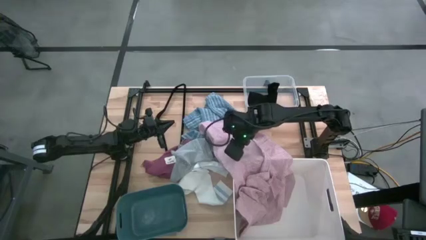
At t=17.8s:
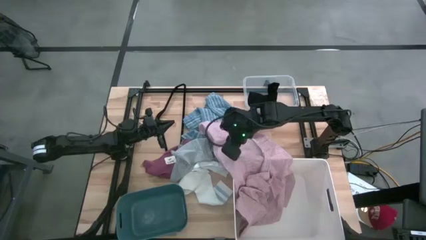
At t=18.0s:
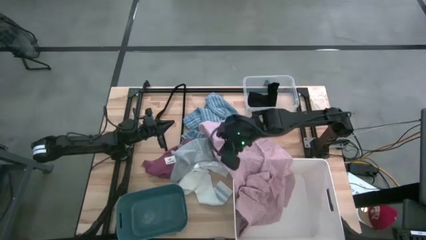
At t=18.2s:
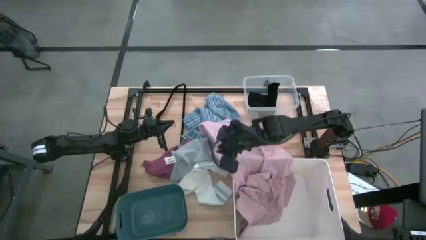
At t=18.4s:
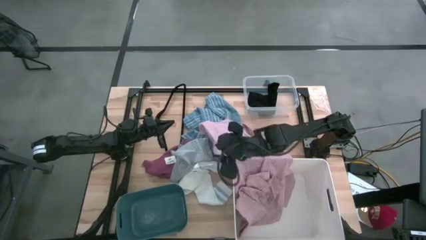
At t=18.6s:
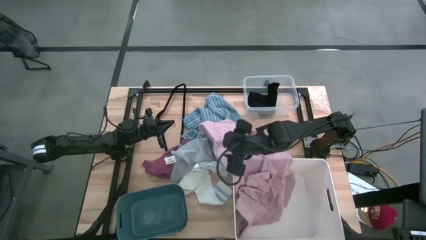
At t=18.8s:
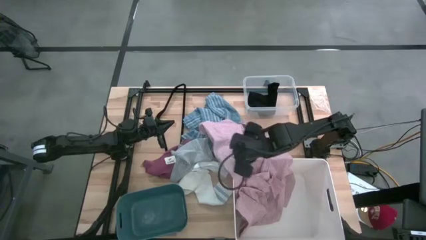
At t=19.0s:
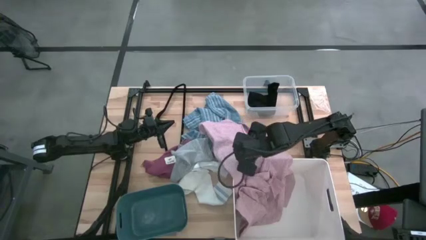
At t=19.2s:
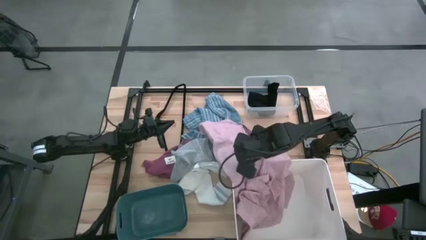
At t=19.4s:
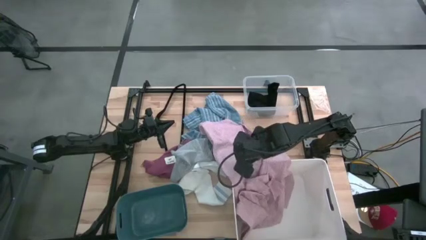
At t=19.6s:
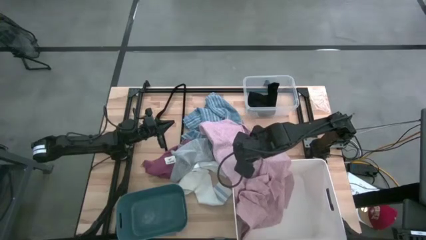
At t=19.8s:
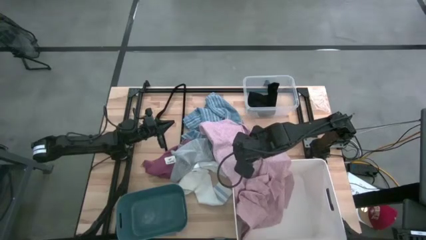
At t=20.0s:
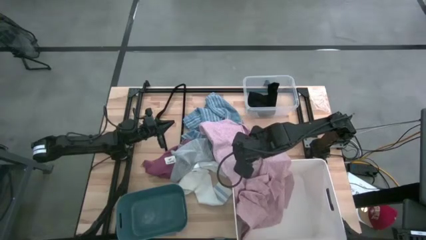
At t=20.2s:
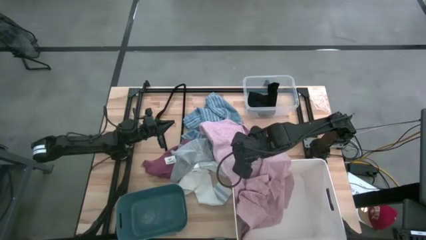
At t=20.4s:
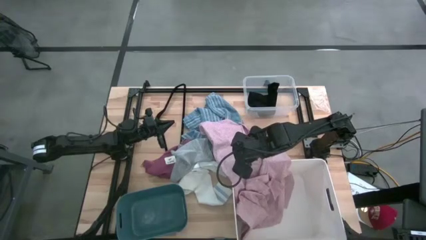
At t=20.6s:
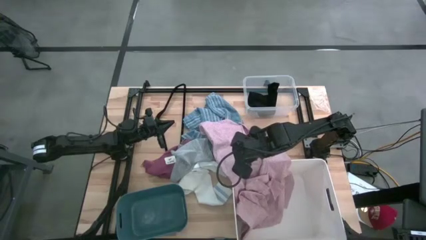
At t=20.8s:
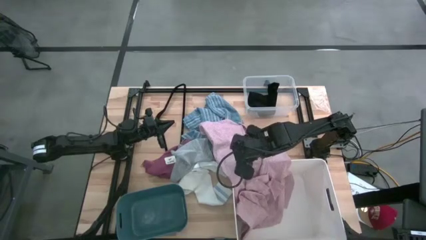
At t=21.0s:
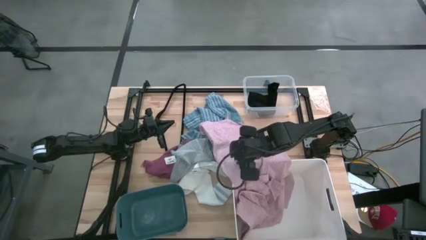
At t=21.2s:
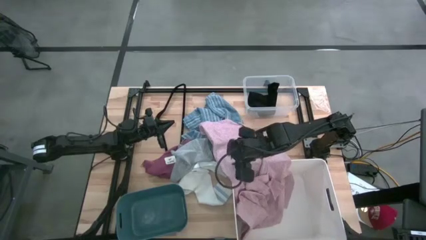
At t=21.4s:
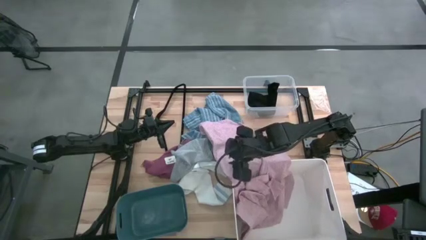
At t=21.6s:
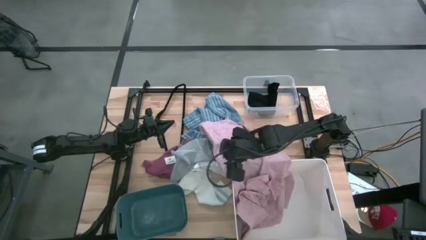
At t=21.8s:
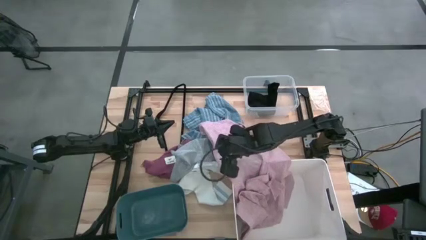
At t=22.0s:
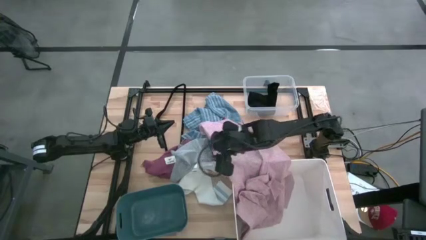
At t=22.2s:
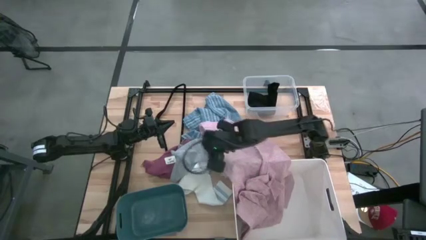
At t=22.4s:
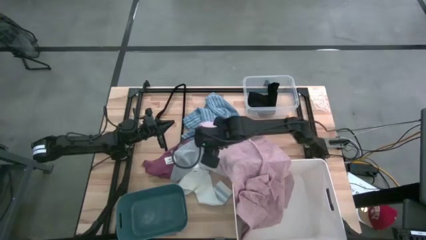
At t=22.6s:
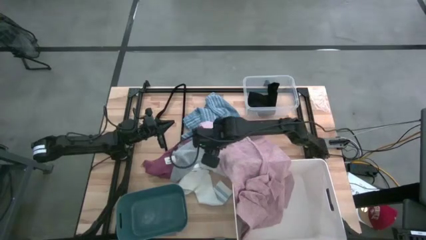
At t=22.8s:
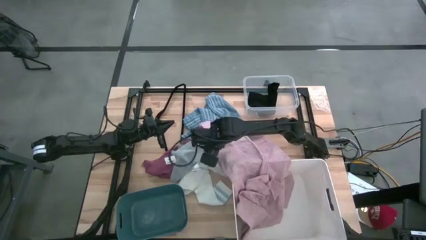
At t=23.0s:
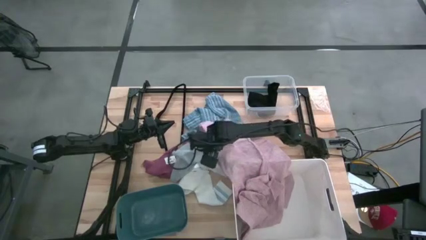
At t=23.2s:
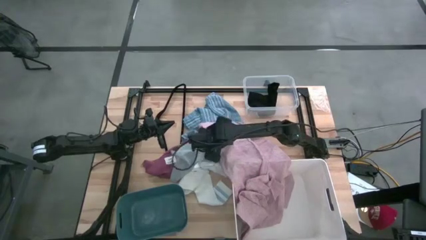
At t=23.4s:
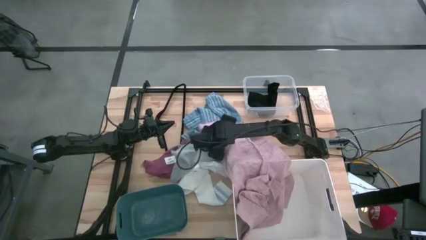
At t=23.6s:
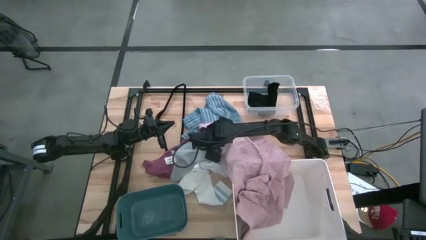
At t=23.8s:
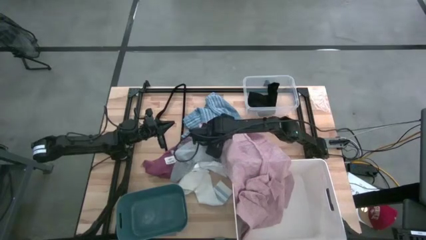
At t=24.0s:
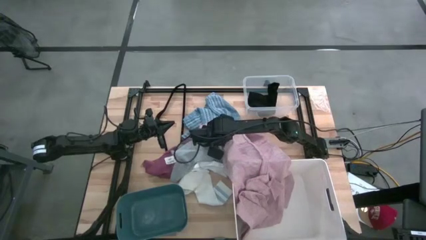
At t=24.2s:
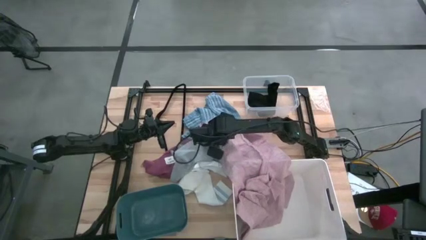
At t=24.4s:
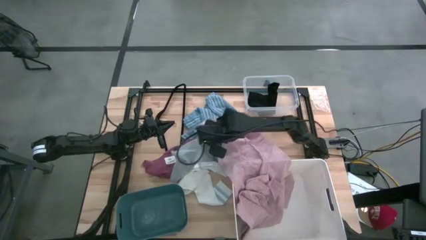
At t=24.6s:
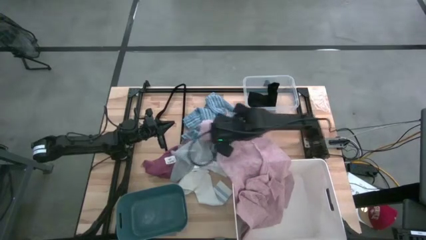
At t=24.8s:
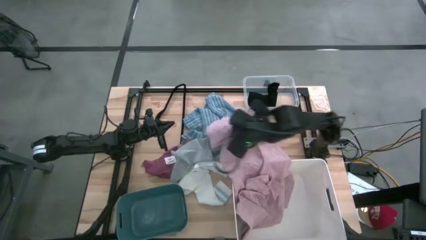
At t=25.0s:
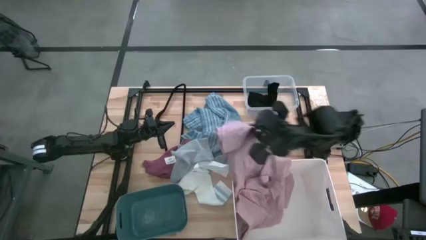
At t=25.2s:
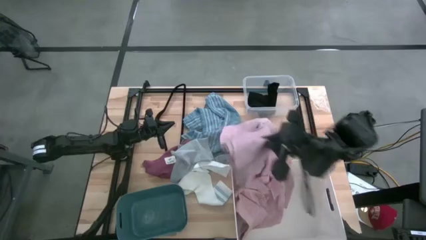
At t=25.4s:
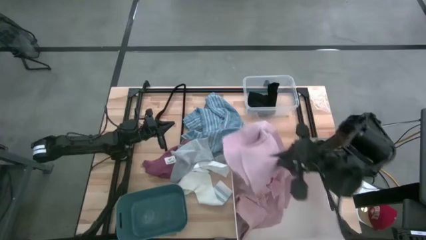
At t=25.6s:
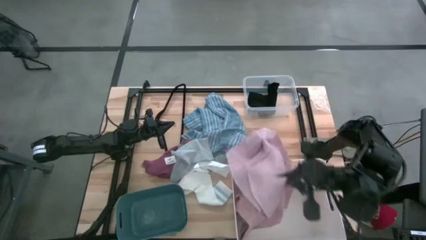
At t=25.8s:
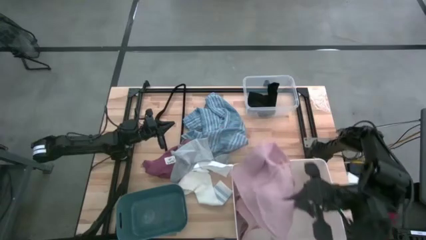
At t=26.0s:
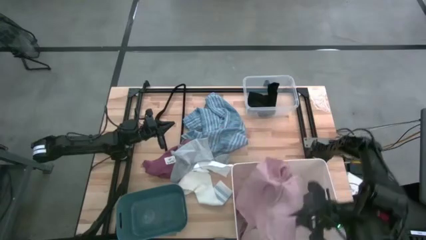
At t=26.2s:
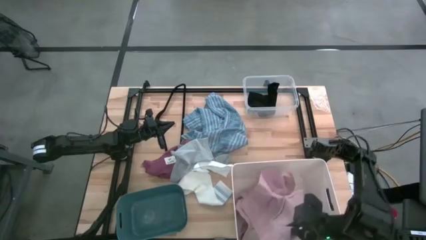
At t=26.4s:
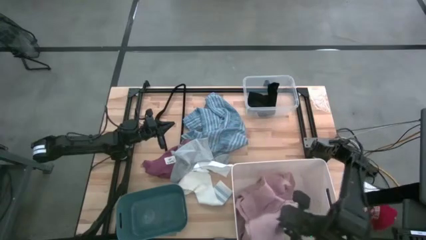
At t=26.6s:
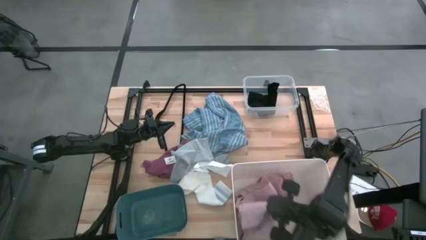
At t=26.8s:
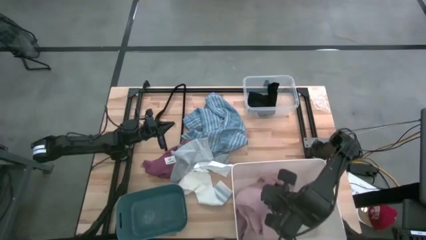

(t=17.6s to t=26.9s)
Task: Pick & Place Cloths
Put the light pink shirt into the white bin

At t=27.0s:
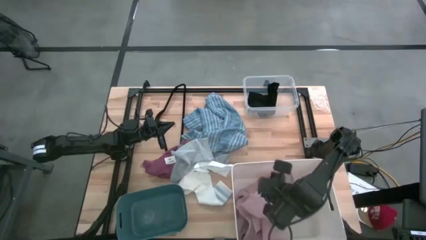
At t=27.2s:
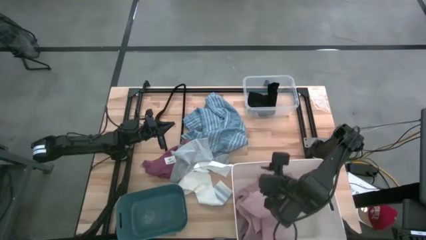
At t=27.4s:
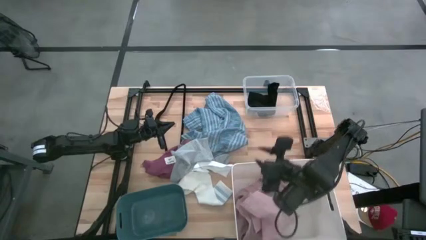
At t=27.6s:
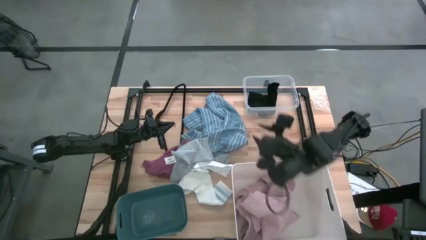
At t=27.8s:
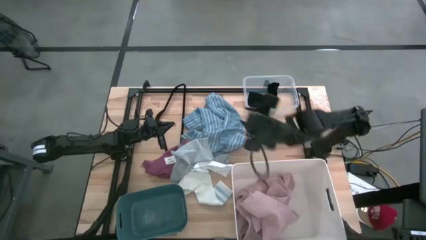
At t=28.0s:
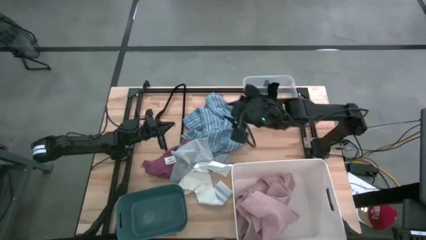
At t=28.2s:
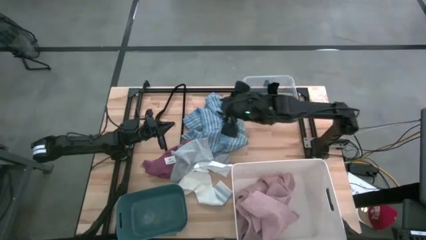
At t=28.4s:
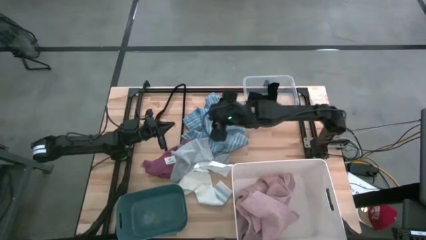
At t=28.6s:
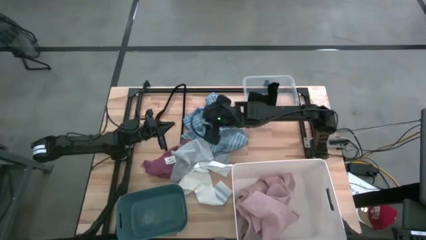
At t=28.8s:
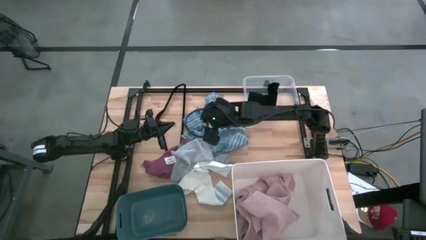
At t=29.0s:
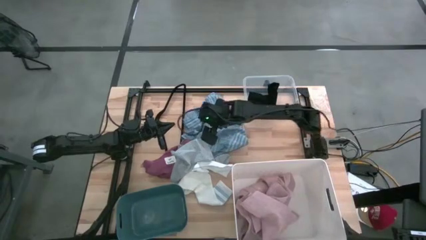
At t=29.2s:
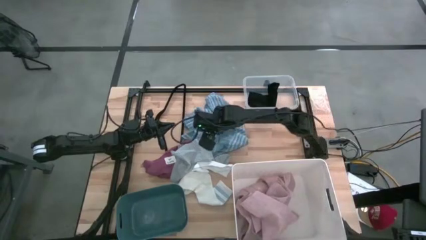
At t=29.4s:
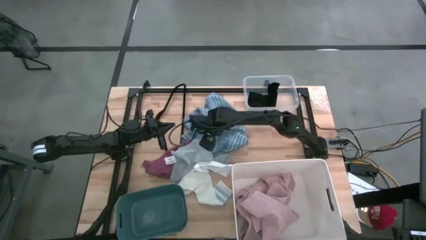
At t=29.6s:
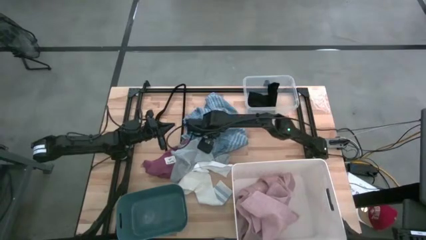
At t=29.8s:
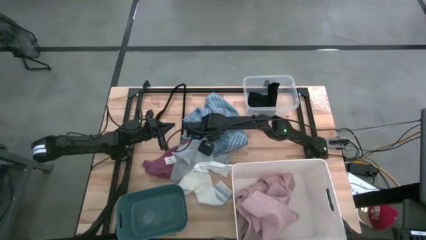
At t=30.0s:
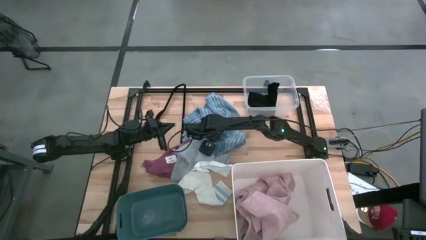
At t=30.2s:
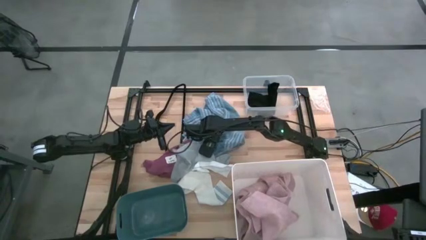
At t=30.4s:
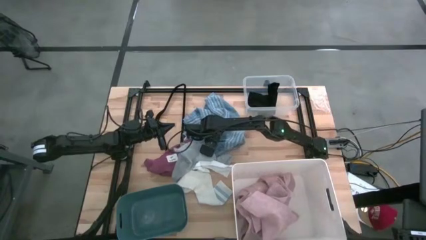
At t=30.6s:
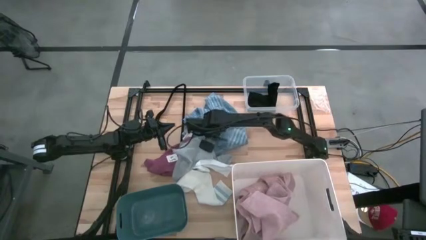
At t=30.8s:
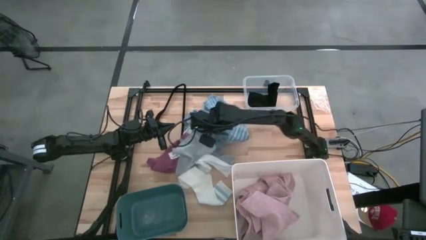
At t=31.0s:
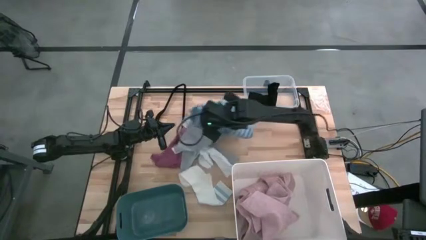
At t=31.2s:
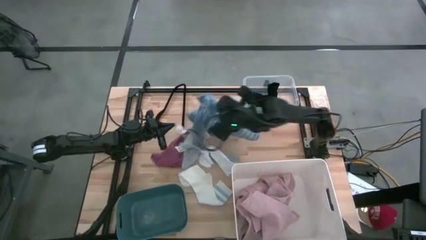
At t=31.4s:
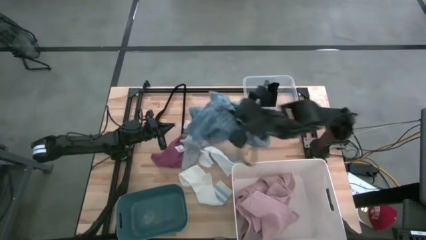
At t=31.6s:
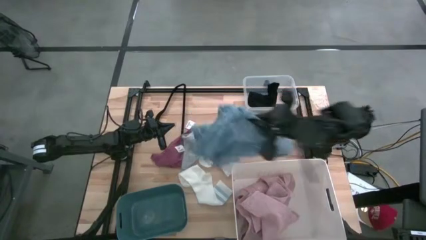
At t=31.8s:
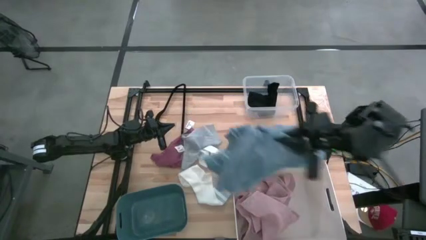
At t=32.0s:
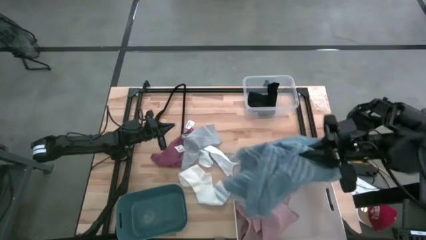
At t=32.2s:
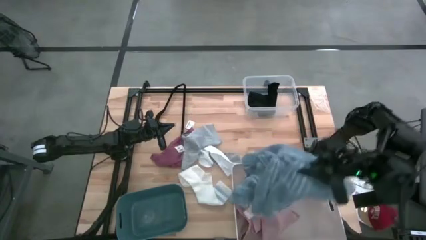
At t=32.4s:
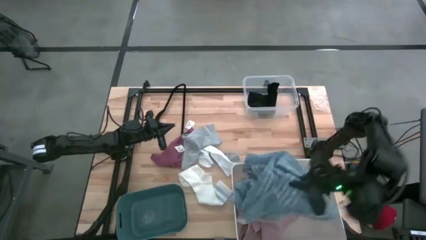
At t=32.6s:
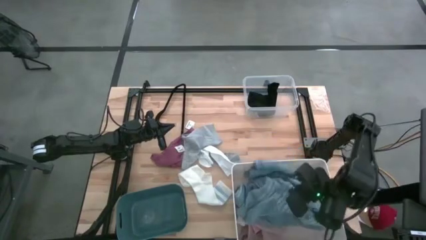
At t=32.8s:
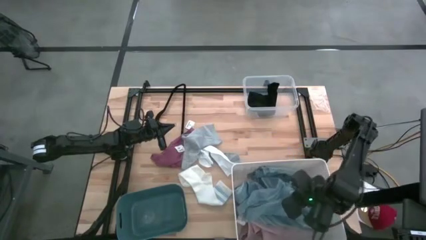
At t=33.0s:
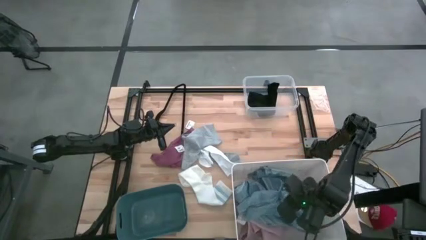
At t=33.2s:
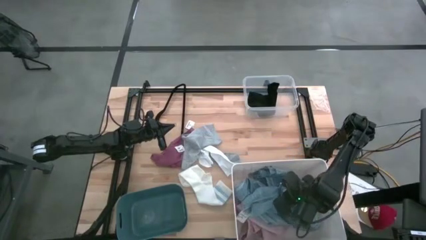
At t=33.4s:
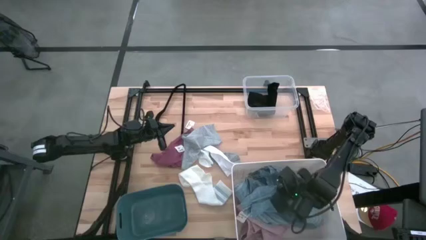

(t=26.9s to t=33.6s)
Put the blue shirt into the white bin
